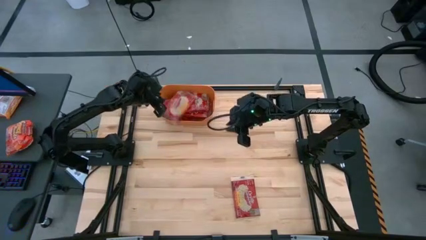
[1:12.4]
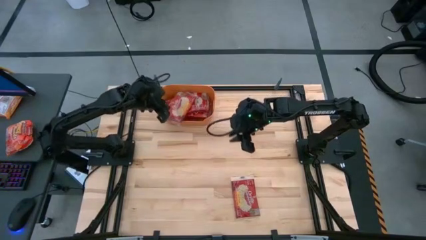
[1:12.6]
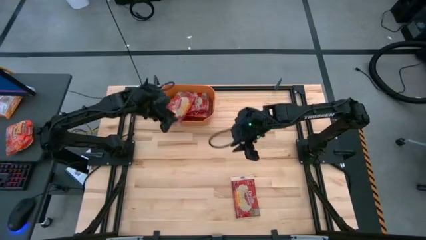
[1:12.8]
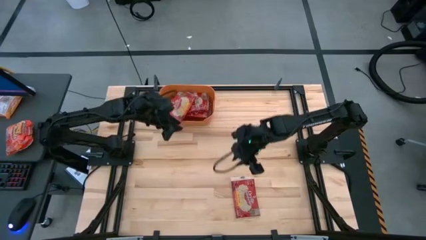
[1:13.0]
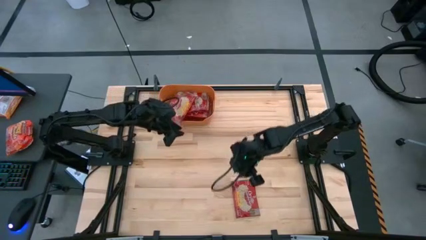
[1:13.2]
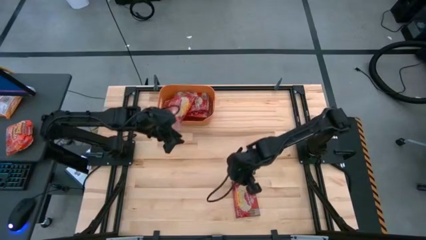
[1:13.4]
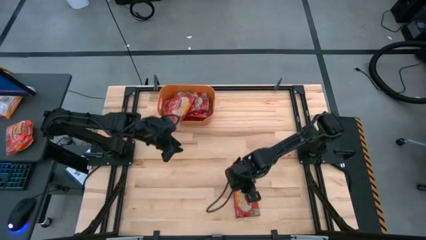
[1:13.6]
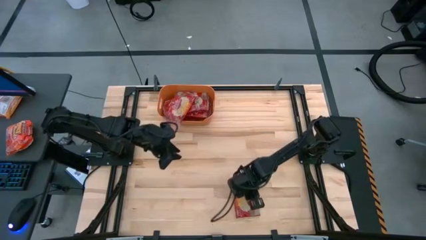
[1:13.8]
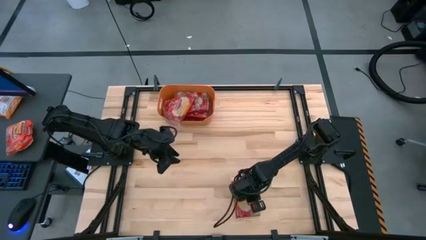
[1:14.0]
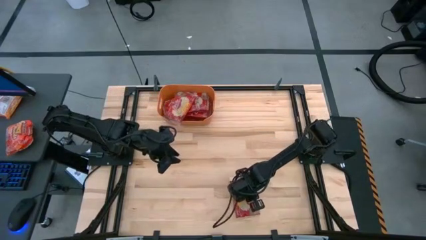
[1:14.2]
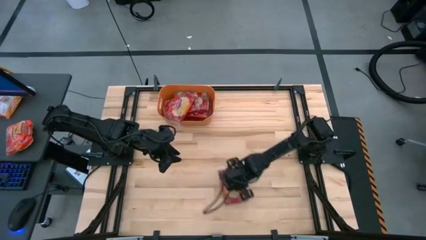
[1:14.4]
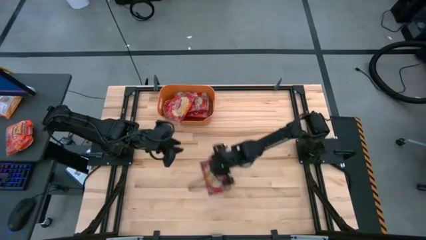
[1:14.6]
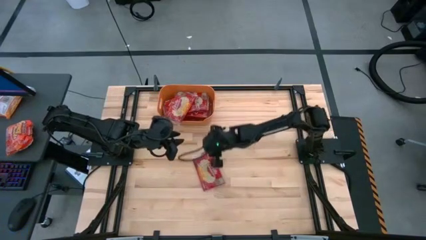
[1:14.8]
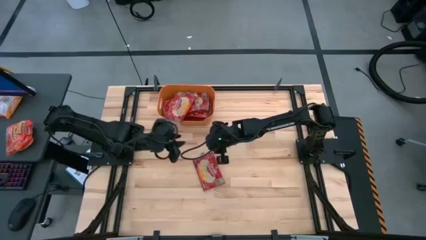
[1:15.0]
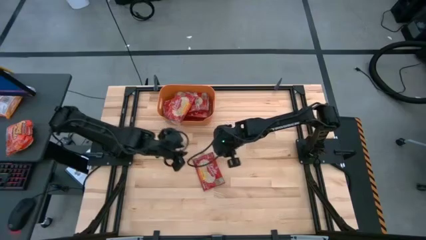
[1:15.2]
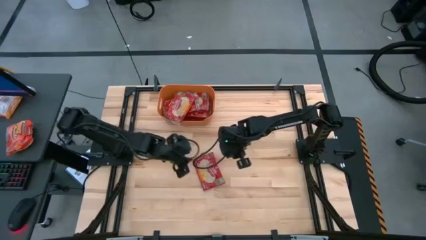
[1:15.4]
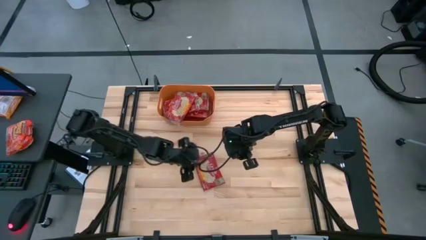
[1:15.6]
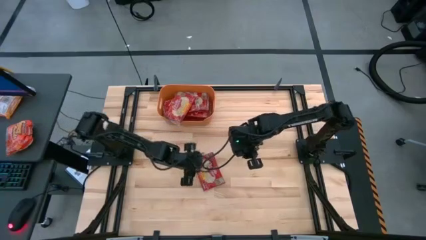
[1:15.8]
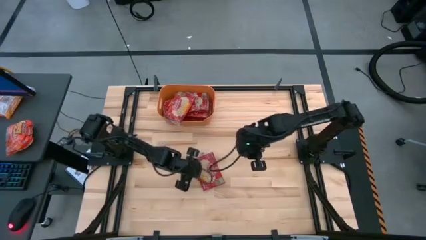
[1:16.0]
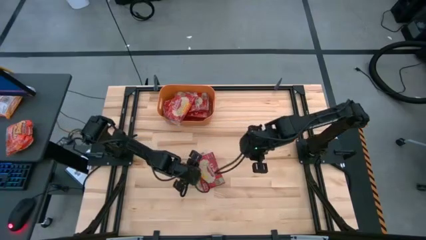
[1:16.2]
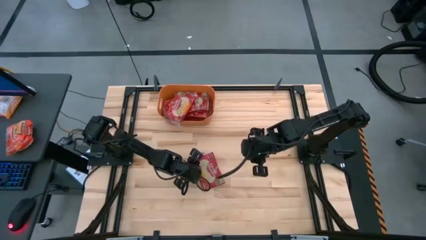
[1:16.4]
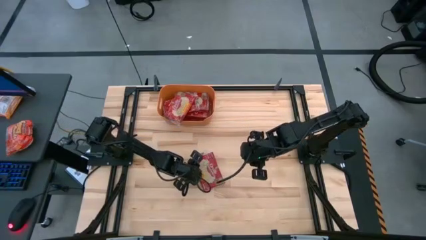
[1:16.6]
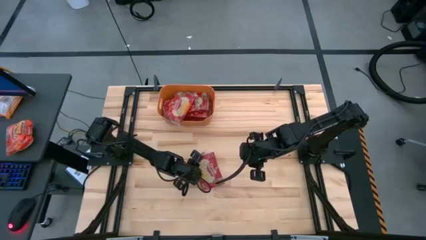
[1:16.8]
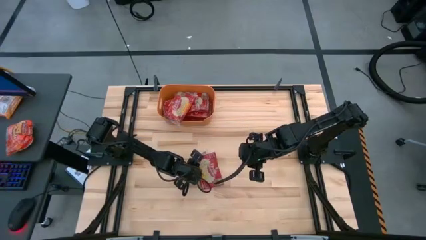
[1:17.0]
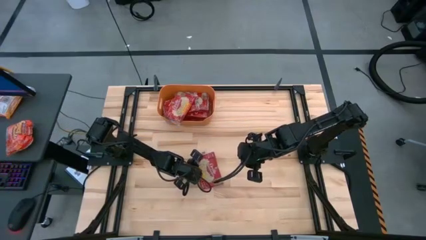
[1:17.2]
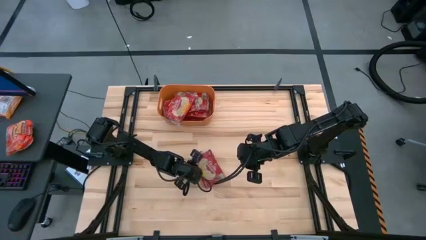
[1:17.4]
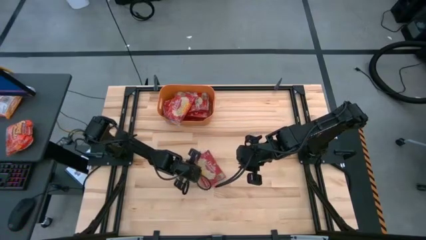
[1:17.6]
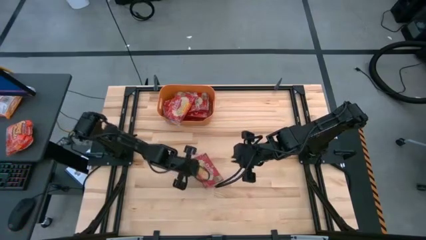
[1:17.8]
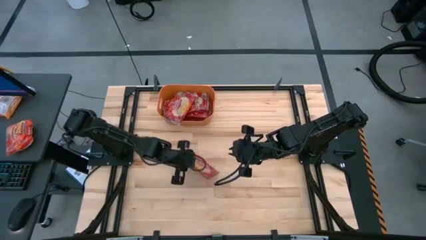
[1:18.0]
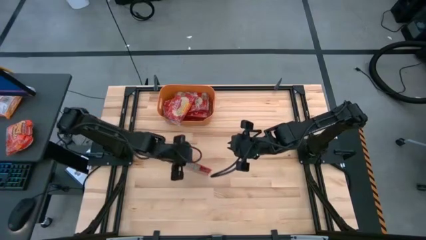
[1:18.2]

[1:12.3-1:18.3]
Task: Sort popcorn bags into baskets
Put the red popcorn bag into the orange bin

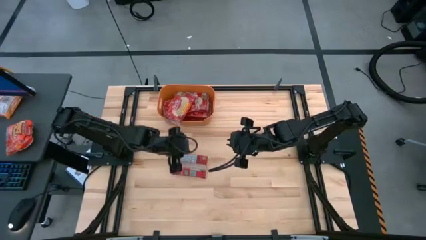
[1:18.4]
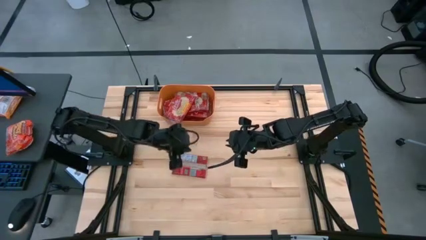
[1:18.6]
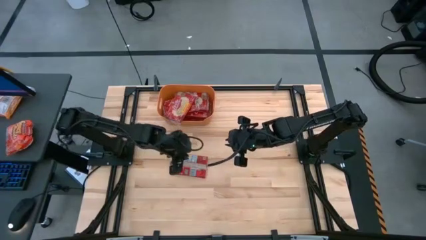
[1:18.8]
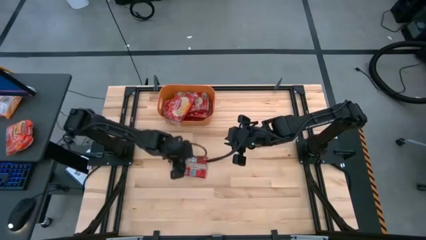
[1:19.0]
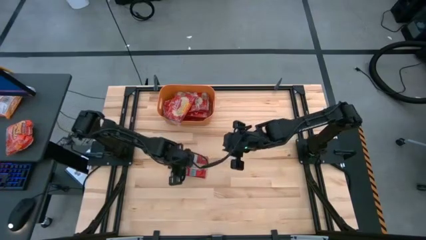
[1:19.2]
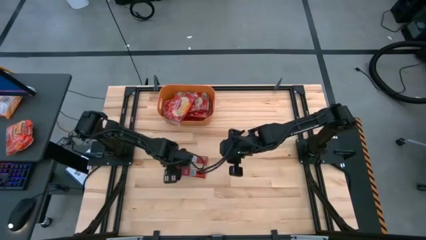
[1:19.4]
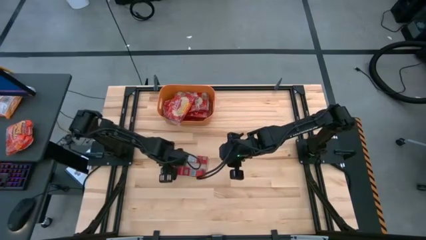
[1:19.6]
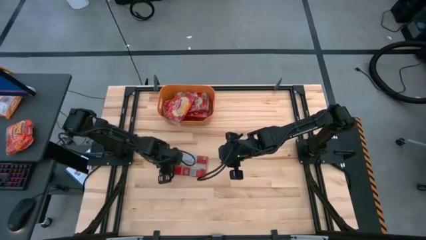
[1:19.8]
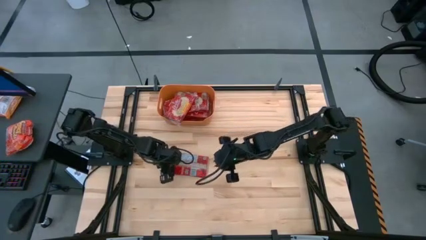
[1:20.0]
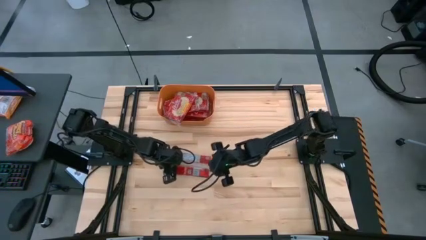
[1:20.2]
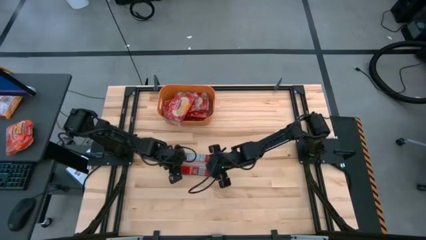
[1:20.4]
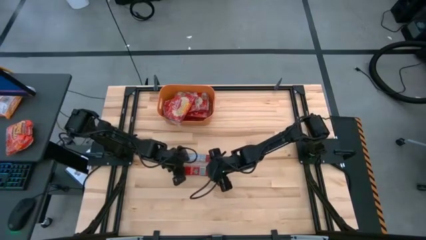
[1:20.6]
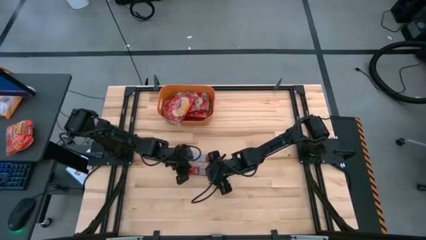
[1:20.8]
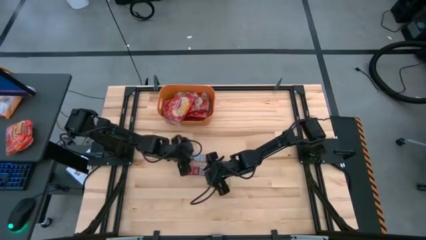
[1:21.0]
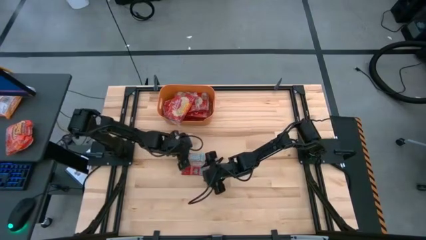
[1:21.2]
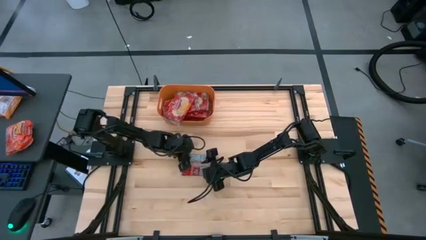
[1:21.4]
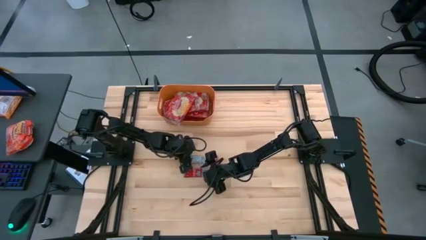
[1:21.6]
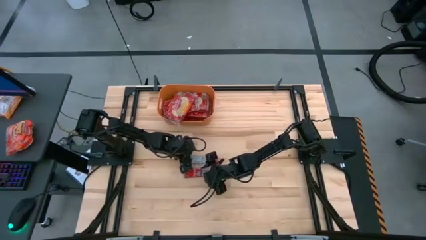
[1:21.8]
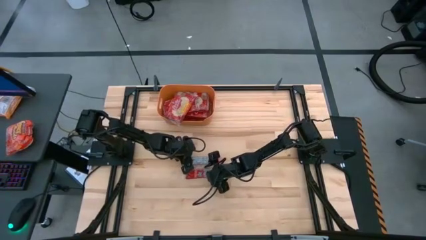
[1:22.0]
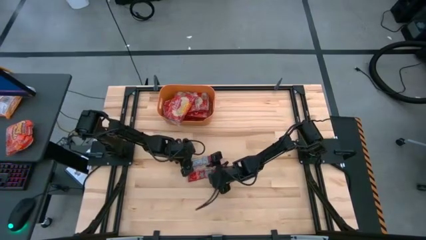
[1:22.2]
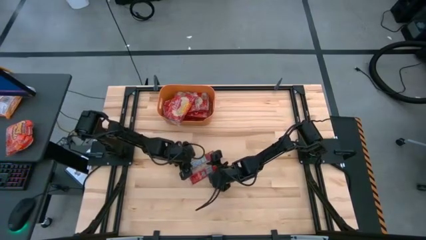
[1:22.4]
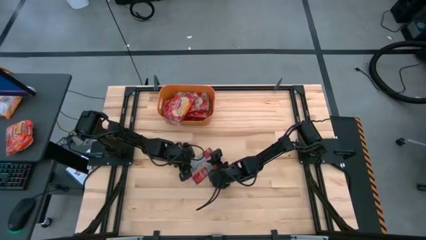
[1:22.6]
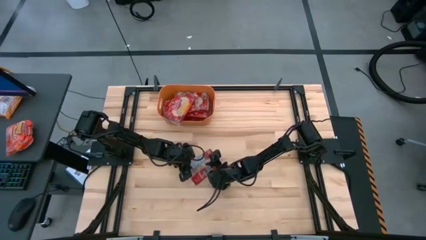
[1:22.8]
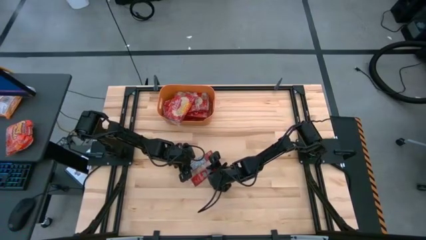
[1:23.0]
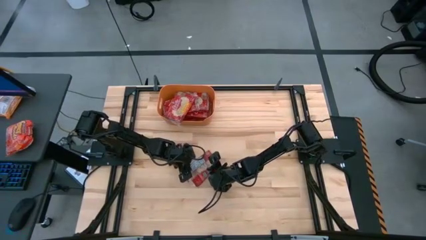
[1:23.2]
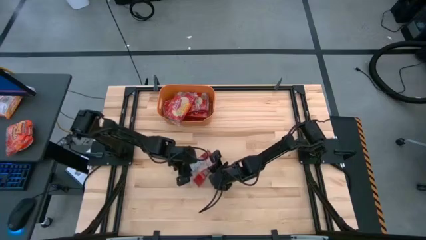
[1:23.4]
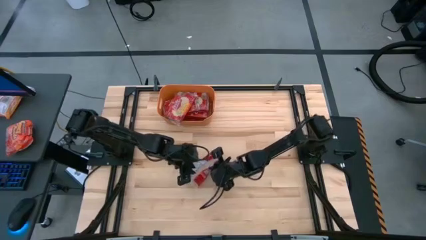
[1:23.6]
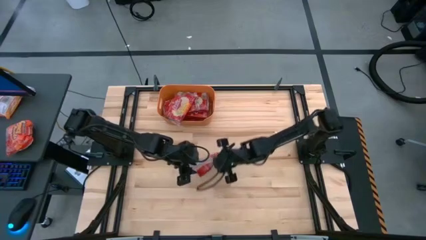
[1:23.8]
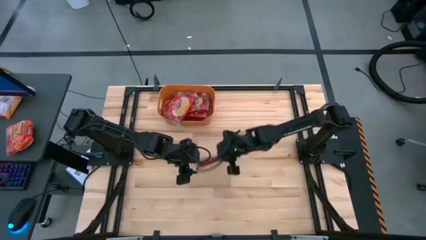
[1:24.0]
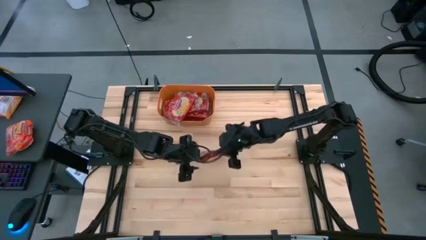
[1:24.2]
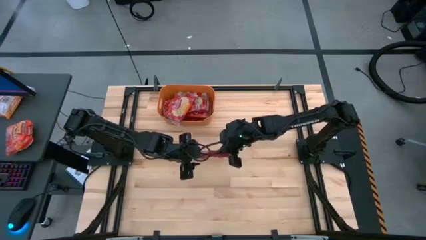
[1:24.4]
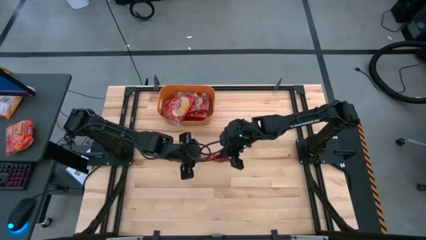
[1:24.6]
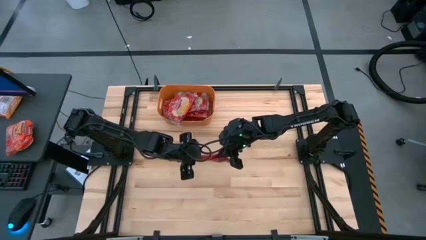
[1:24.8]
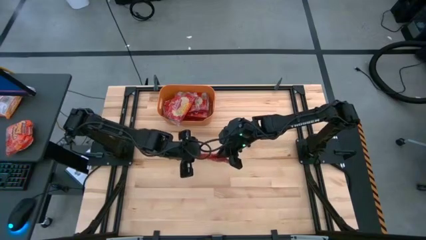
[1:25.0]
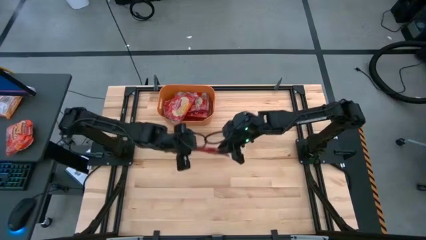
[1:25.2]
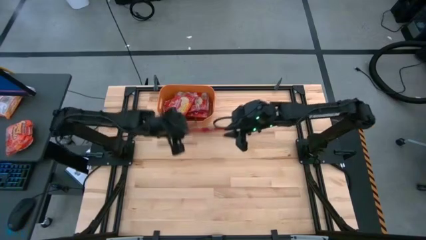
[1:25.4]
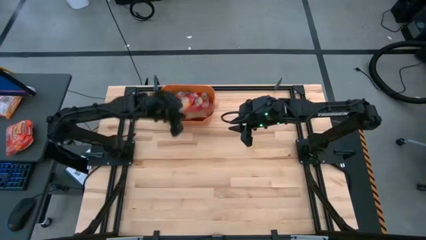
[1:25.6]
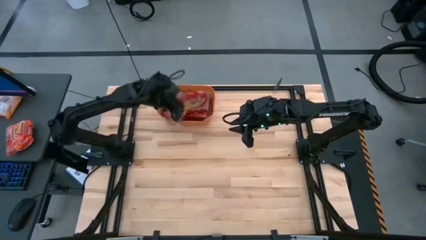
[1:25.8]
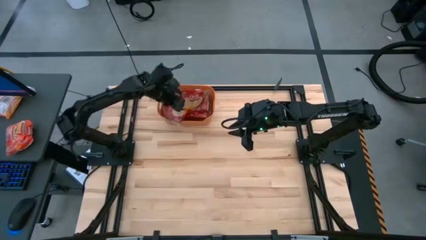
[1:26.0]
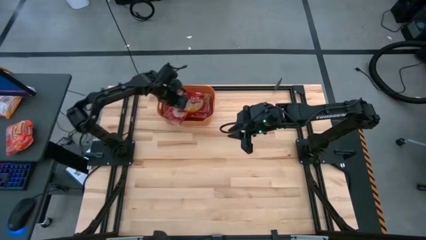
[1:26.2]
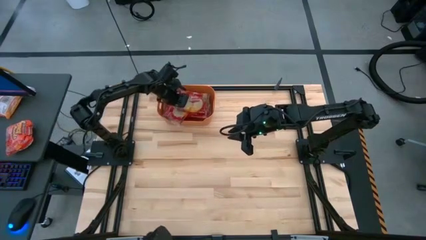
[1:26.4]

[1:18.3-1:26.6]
Put the red popcorn bag into the orange bin

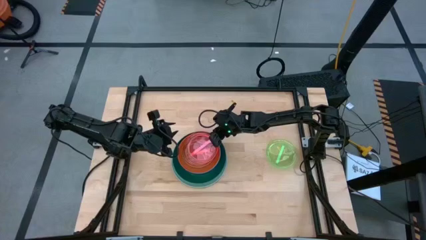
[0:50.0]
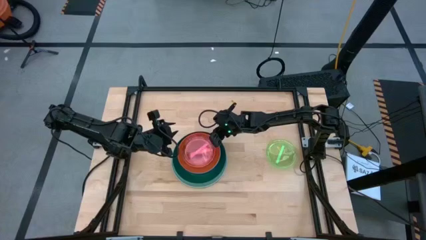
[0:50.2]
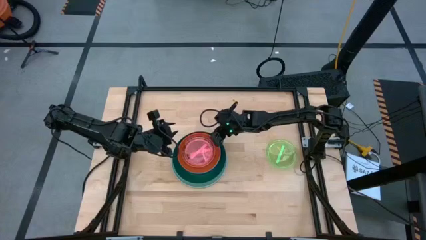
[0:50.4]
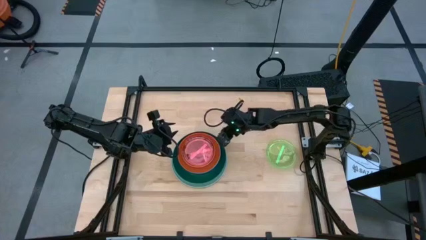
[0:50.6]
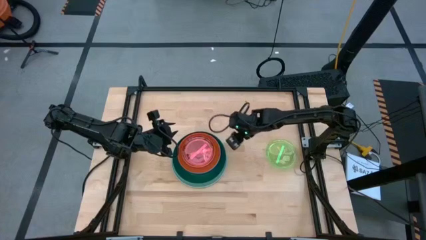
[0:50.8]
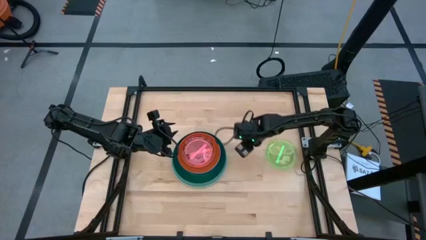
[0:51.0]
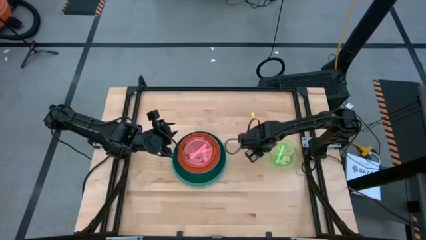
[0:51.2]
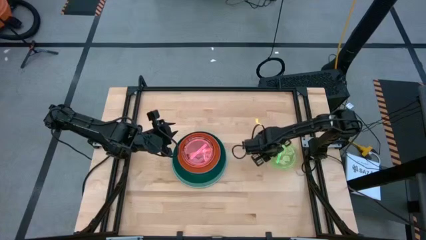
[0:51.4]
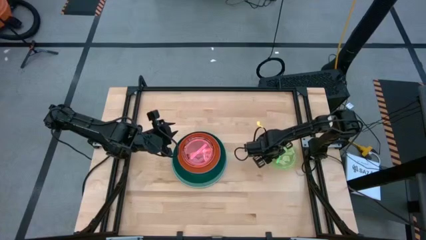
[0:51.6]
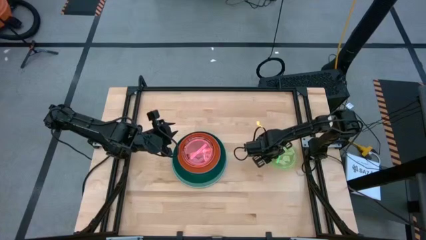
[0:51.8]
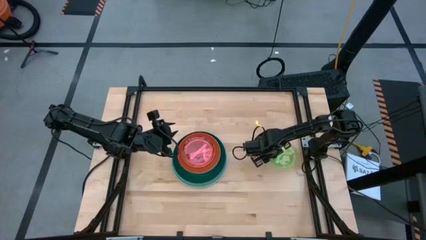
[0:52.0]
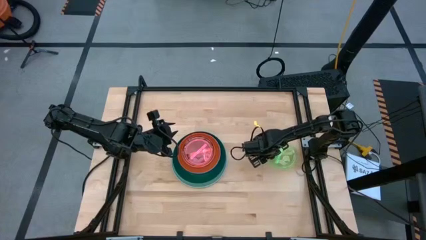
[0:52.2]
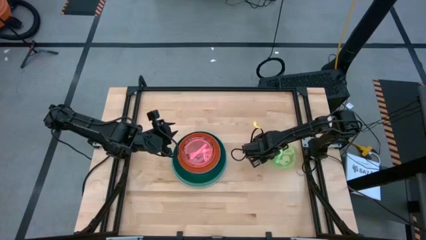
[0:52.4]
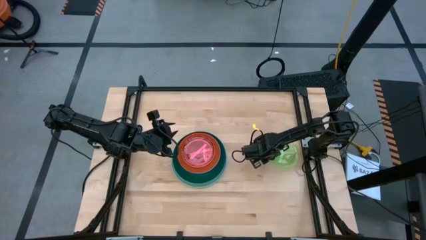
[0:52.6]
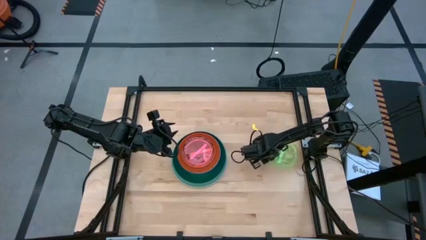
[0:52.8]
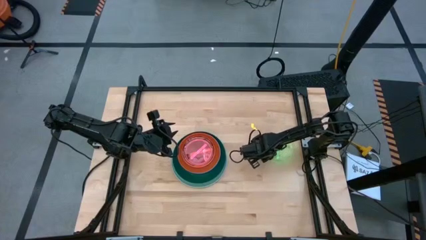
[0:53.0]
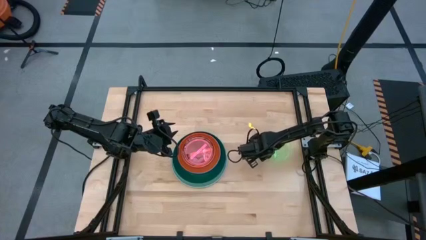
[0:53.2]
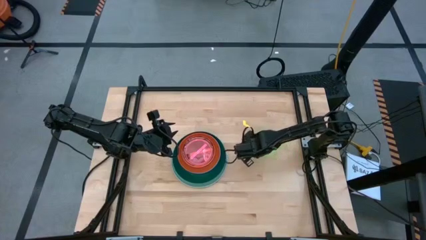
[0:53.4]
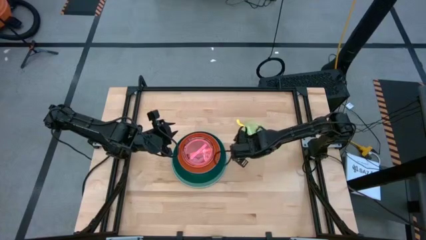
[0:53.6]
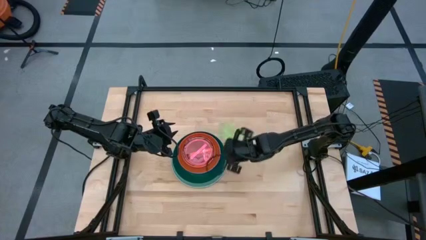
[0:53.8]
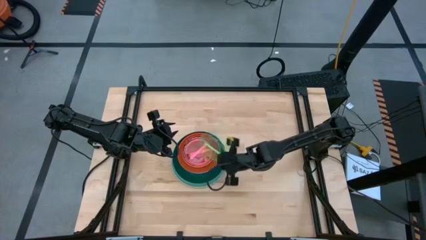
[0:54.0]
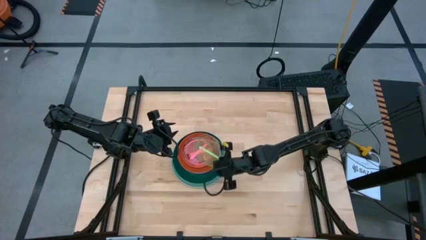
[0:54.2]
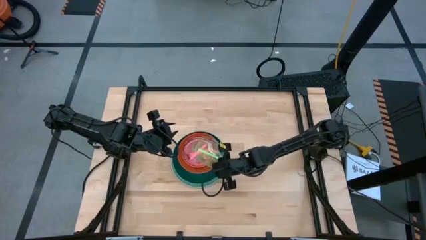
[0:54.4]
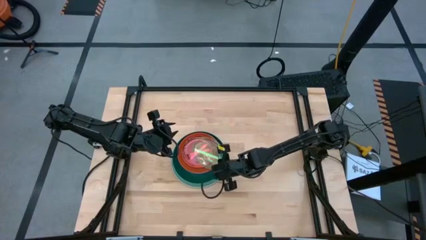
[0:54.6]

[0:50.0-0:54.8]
Task: Stack plastic plates
Stack the light green plate on top of the pink plate
